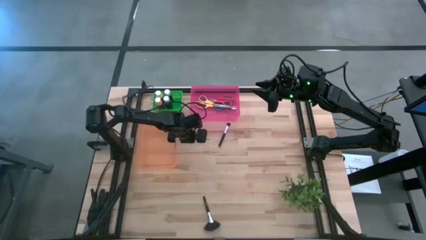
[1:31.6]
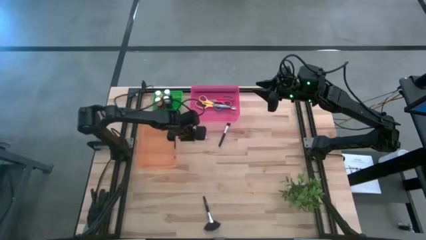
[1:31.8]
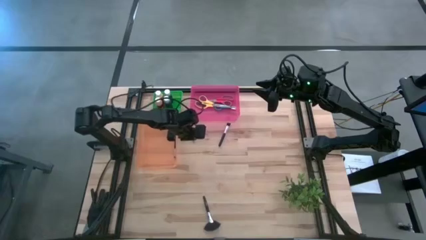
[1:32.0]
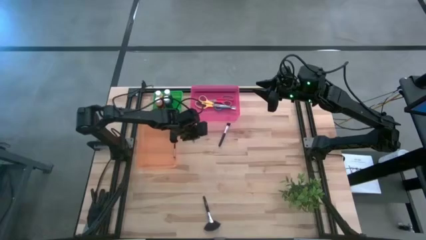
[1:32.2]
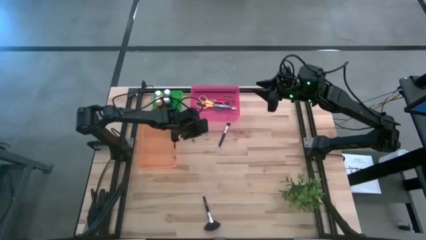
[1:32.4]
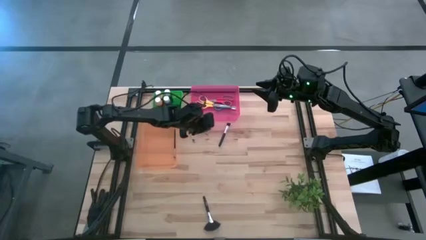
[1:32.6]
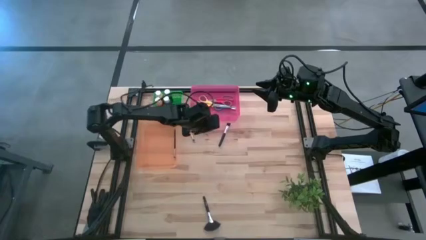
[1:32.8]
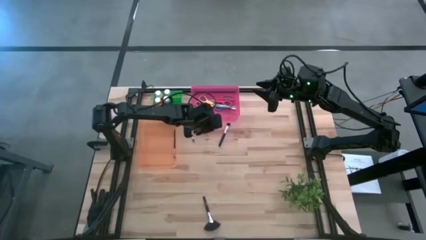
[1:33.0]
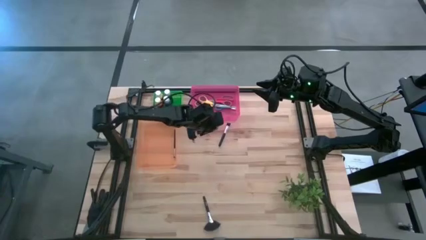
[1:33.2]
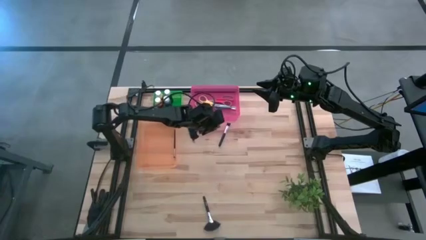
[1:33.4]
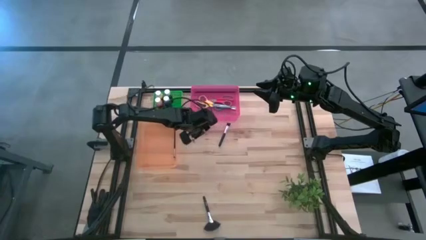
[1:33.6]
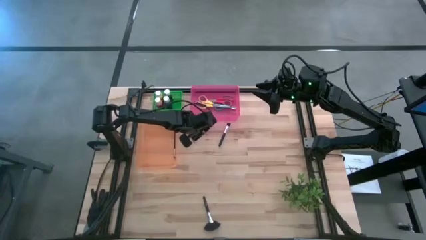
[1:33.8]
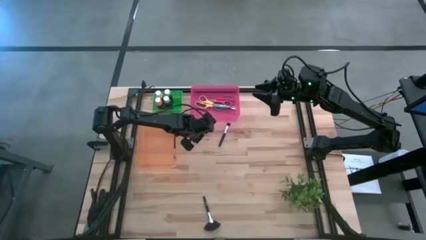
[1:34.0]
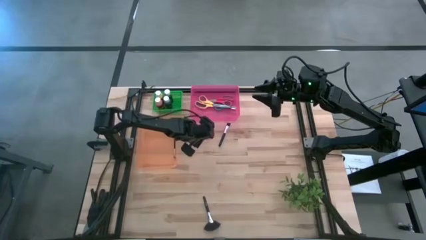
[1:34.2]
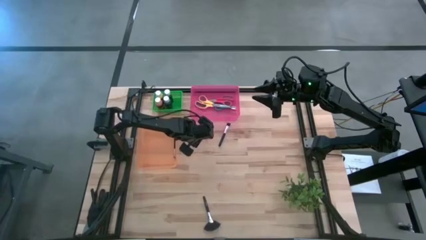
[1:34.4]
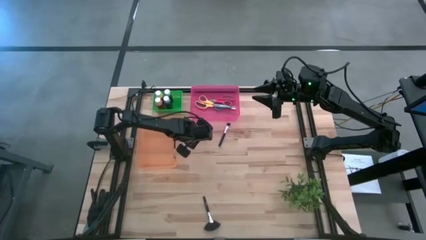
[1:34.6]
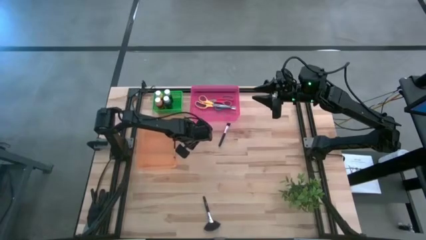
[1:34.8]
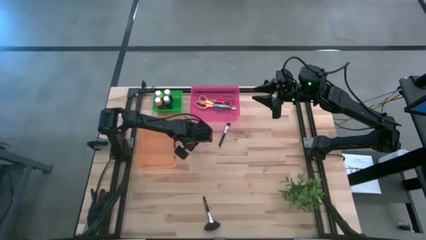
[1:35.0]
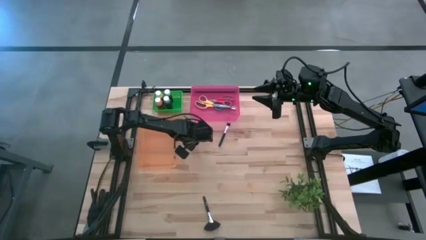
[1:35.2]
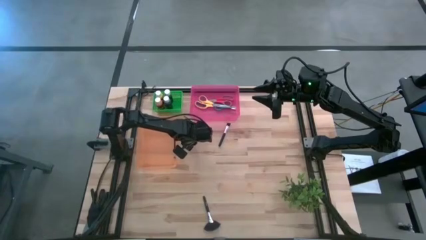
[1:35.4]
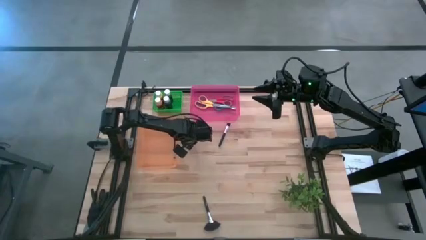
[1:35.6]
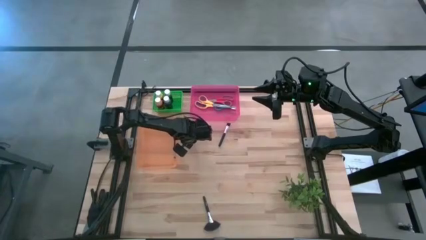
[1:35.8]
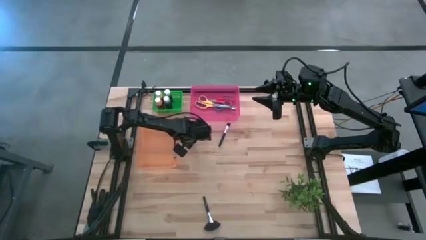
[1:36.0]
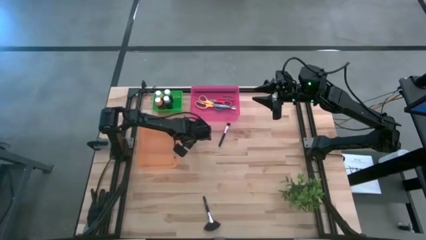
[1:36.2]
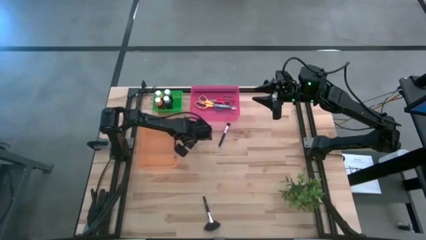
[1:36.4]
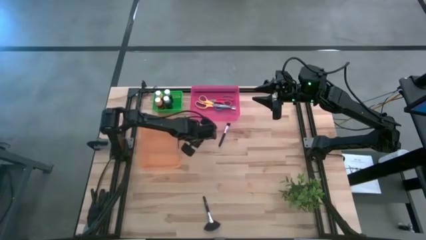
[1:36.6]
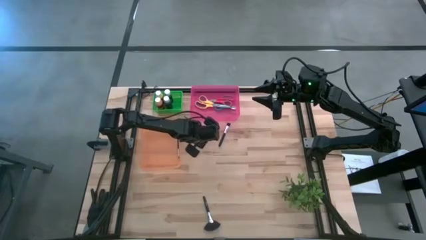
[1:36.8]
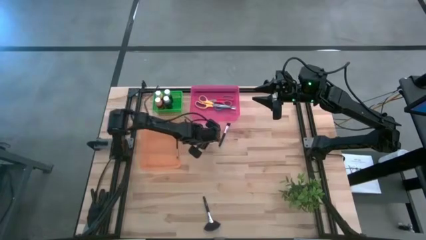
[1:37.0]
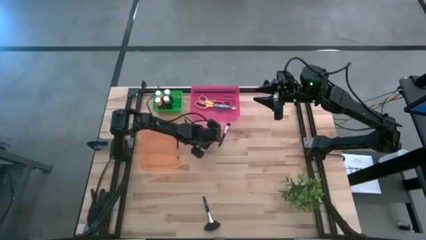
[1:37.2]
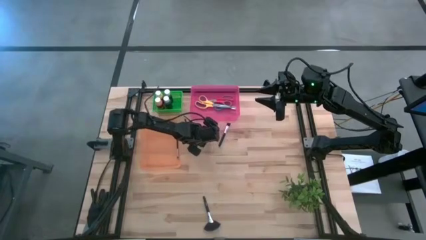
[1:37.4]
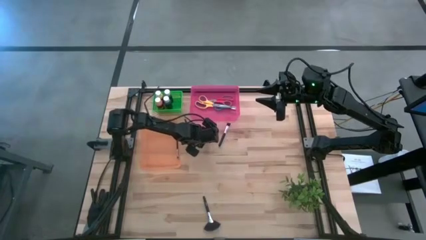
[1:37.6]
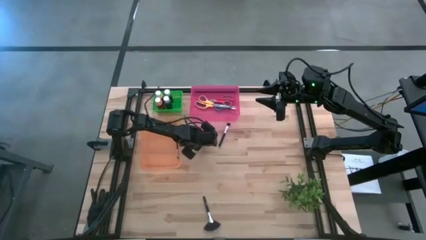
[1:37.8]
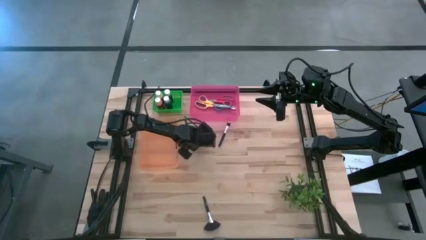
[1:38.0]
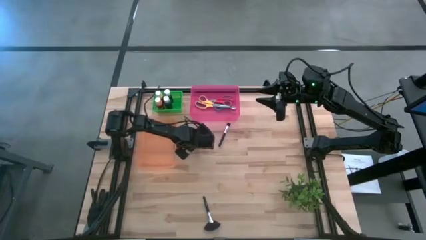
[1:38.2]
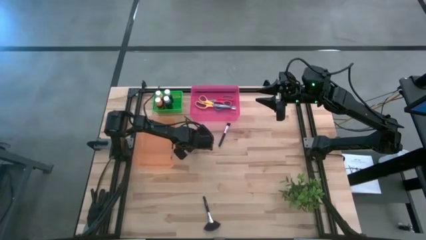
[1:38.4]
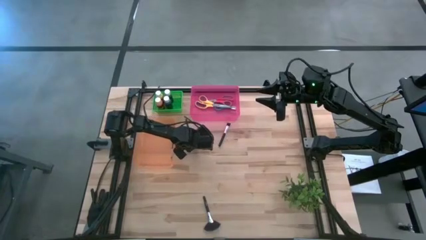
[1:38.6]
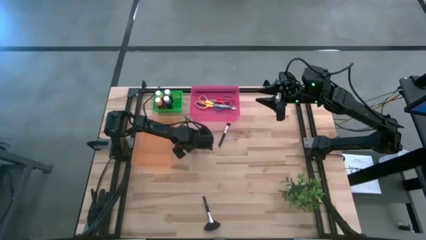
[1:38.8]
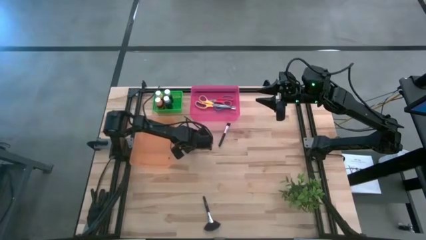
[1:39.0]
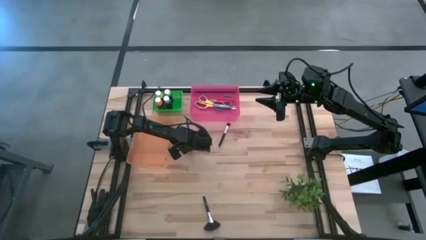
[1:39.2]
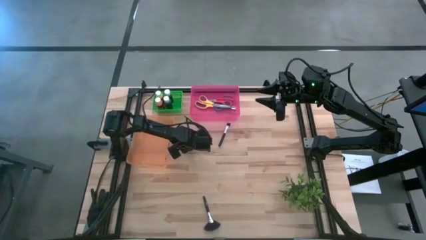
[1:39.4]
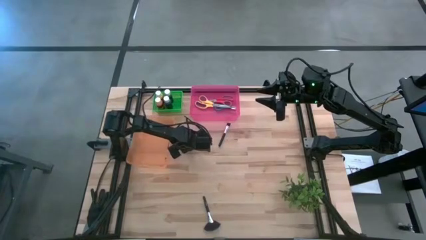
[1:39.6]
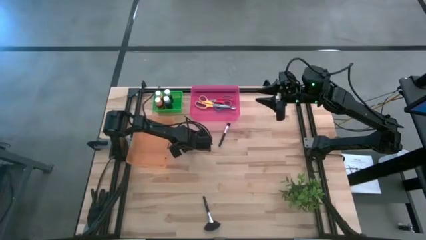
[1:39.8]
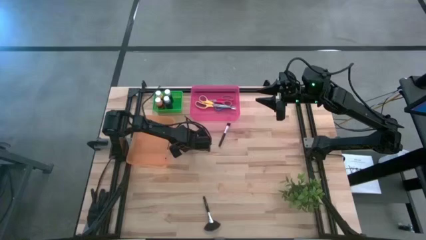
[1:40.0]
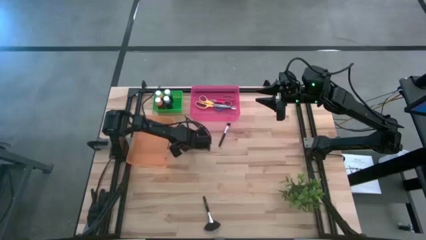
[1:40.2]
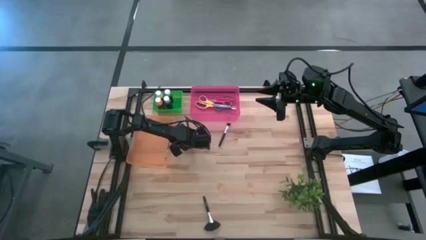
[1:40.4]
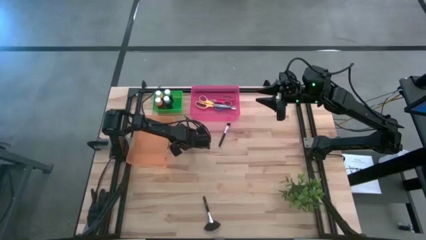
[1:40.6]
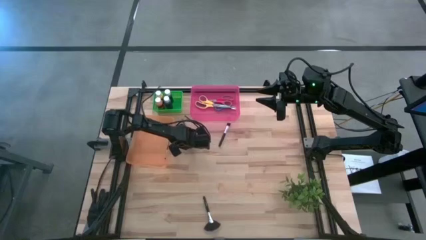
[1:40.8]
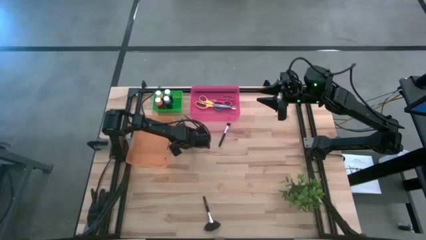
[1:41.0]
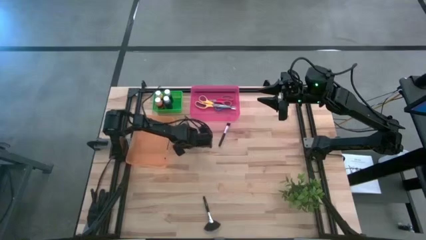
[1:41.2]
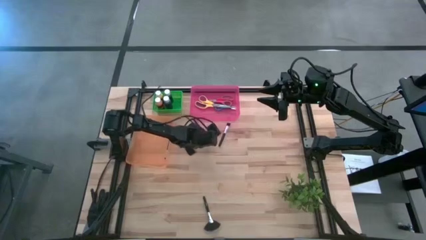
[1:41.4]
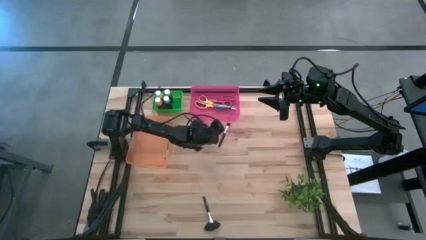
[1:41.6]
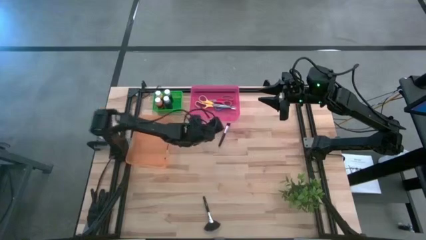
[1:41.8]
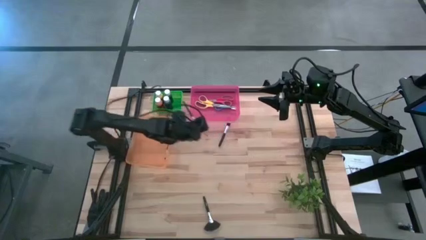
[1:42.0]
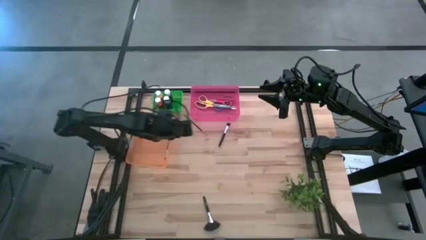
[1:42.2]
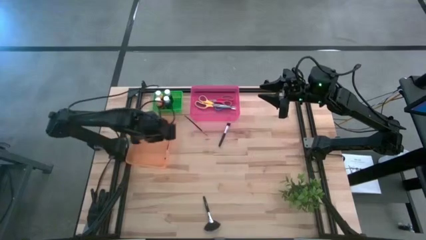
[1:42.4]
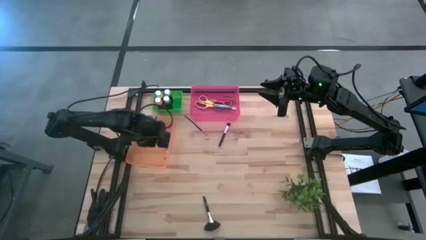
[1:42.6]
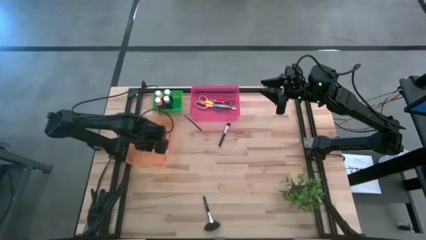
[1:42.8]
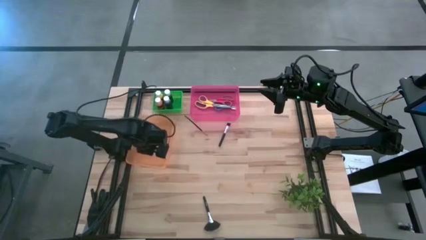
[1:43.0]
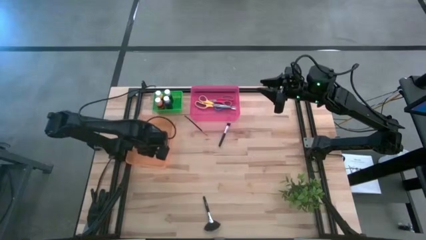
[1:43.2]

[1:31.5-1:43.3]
Task: Pick & Place Paint Supplies
Put the black paintbrush into the orange bin
